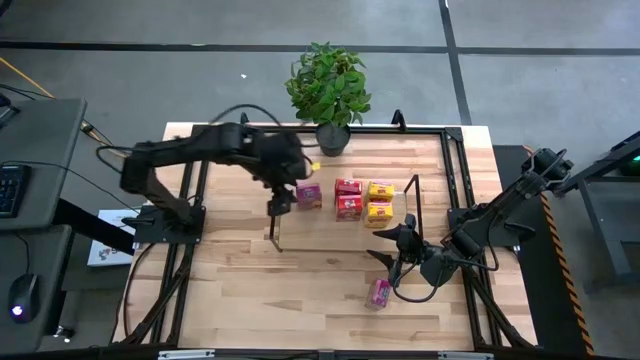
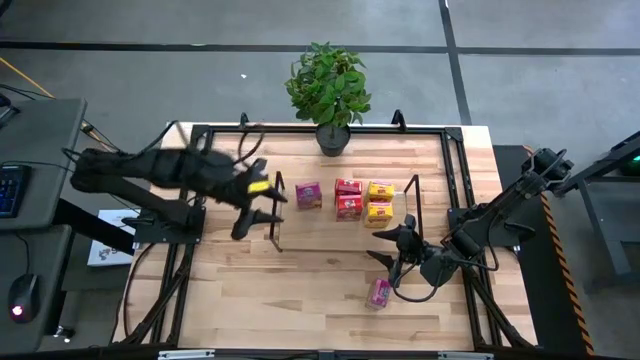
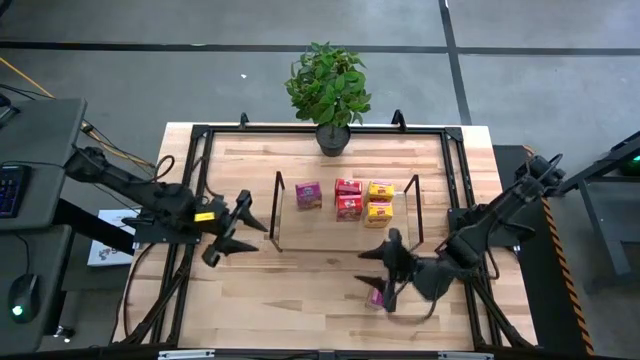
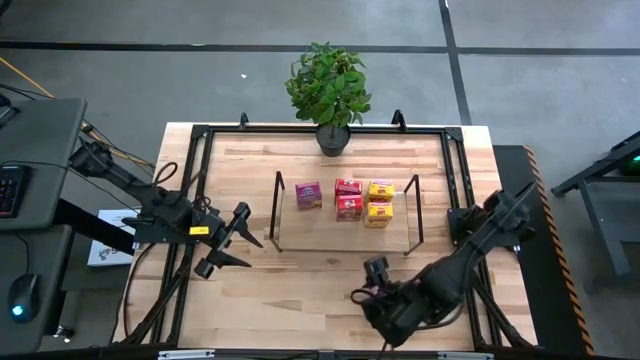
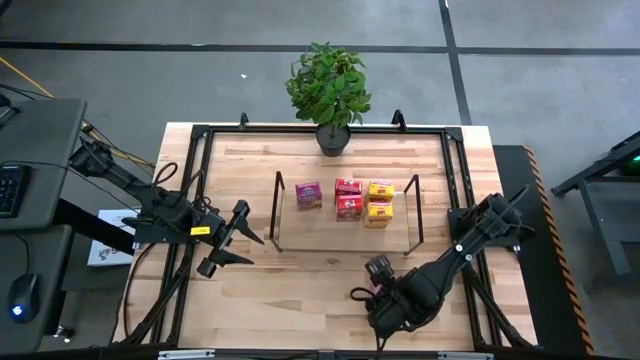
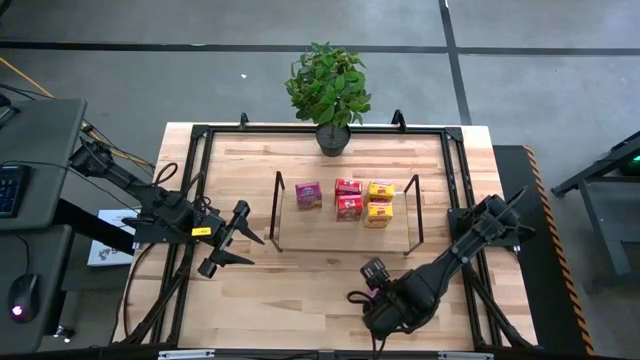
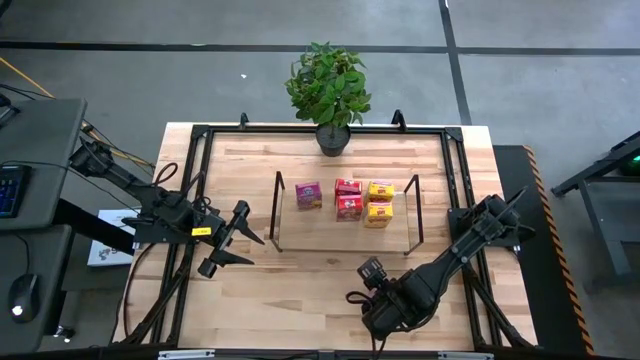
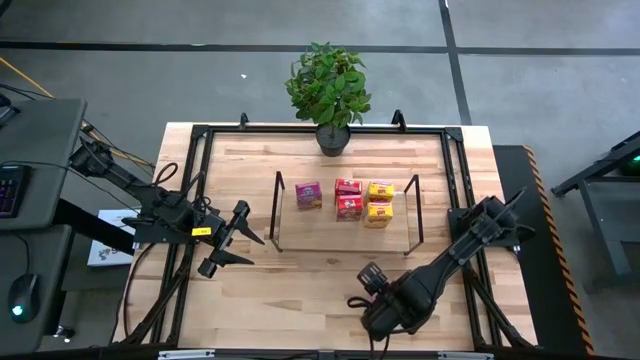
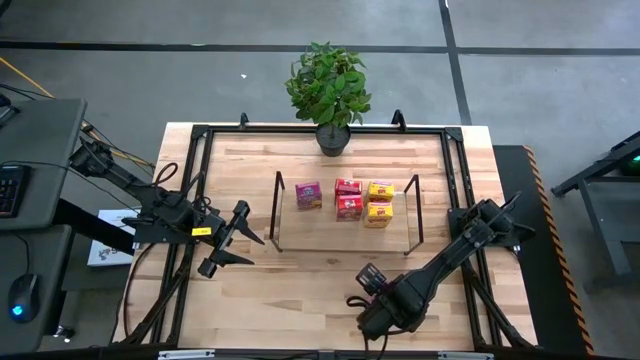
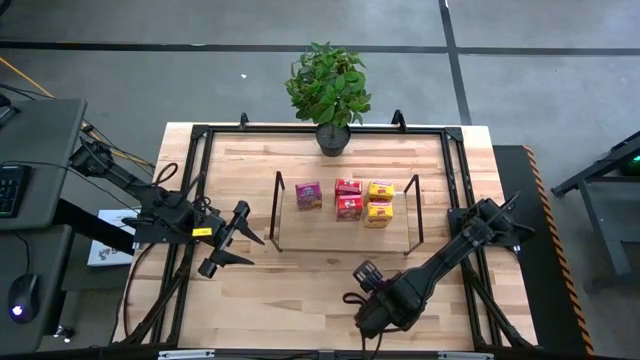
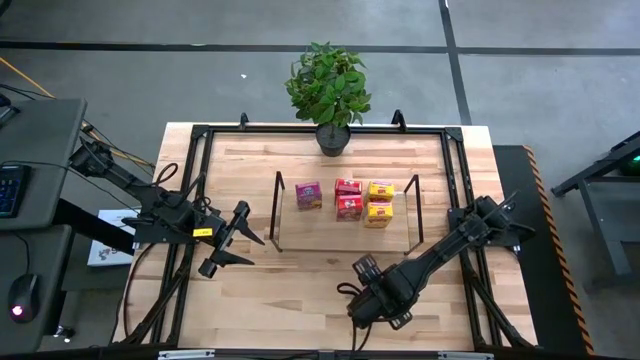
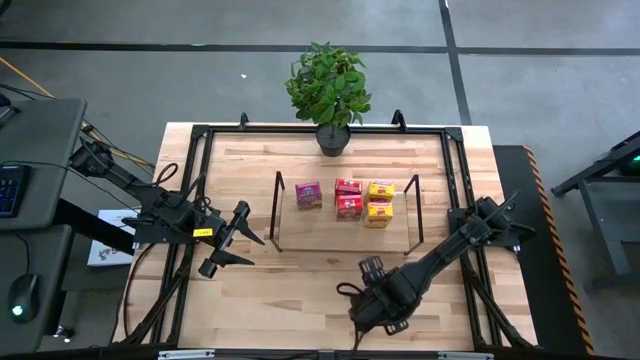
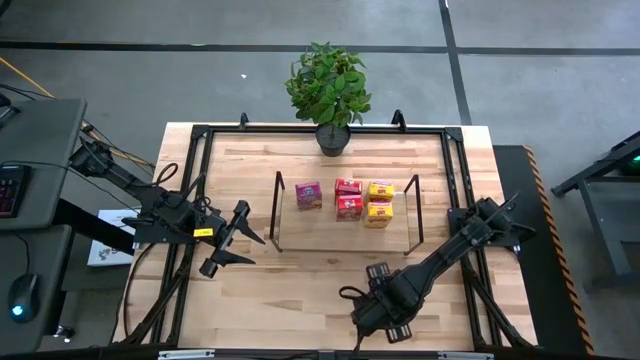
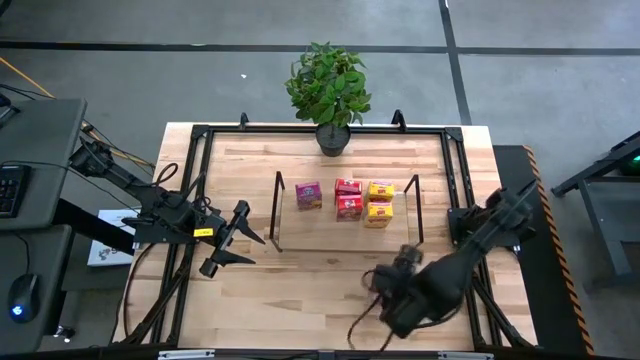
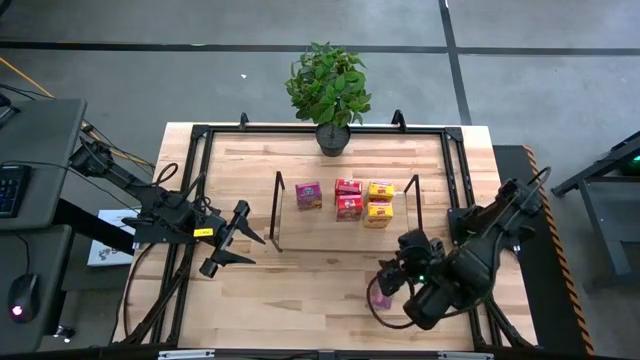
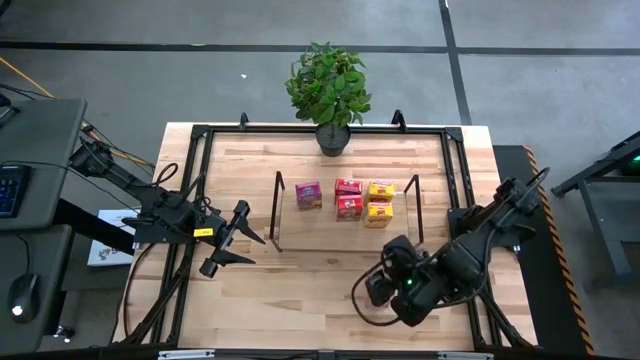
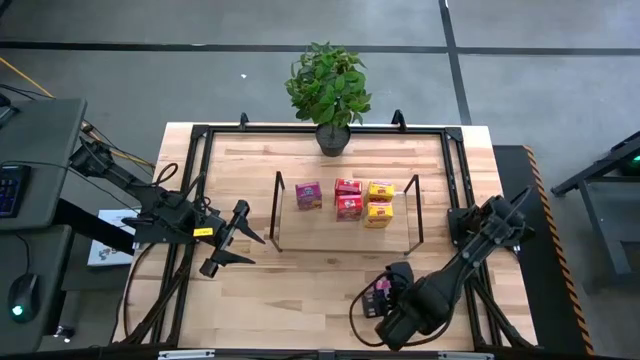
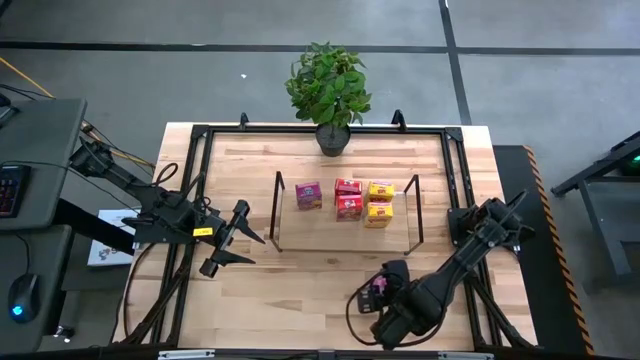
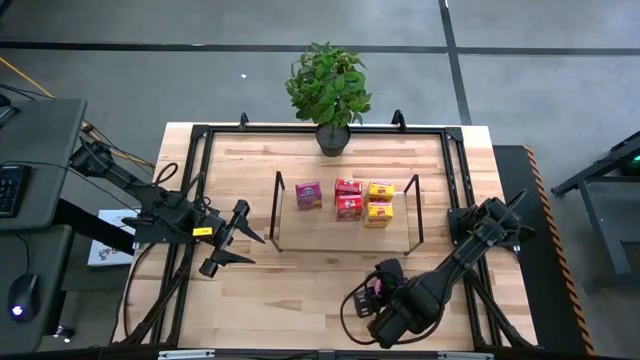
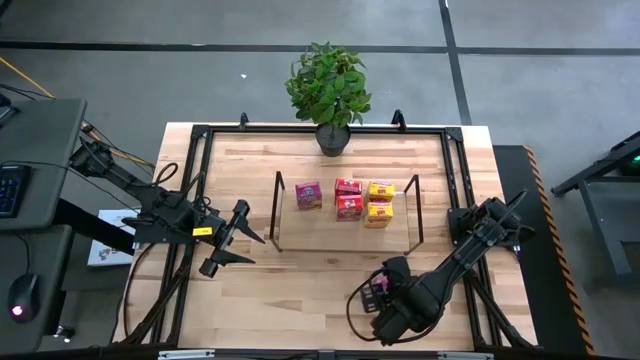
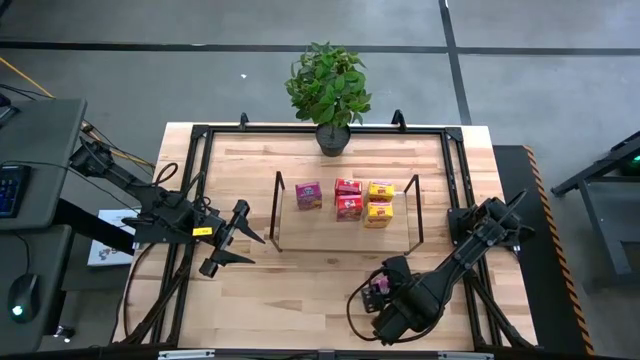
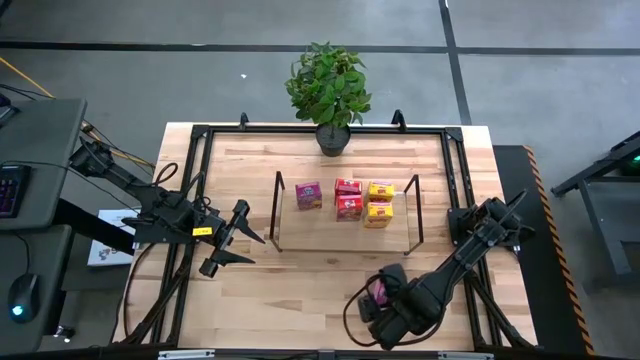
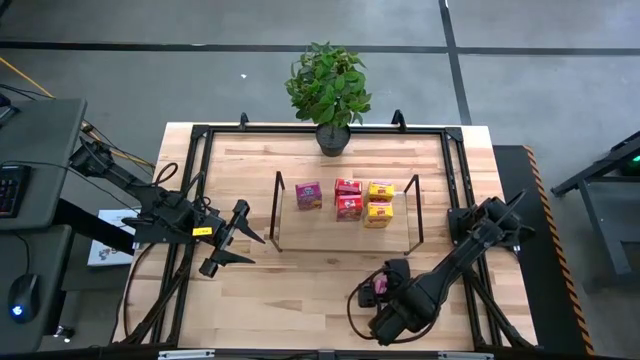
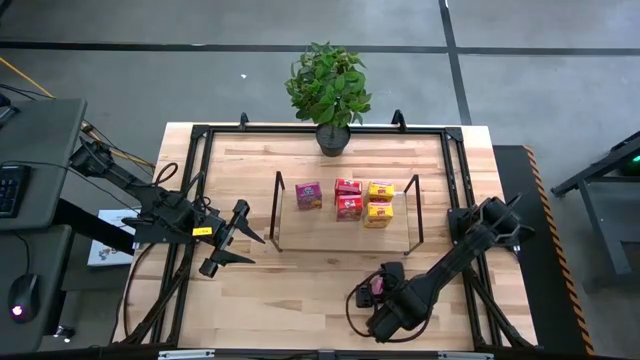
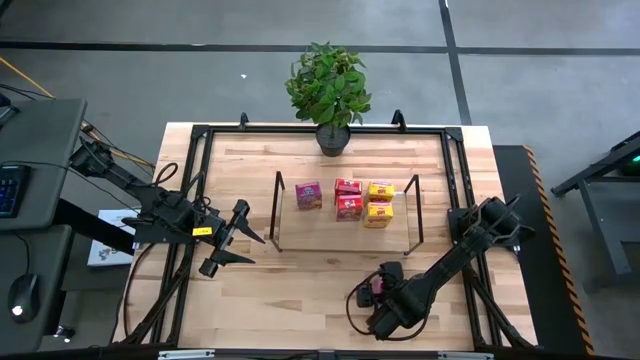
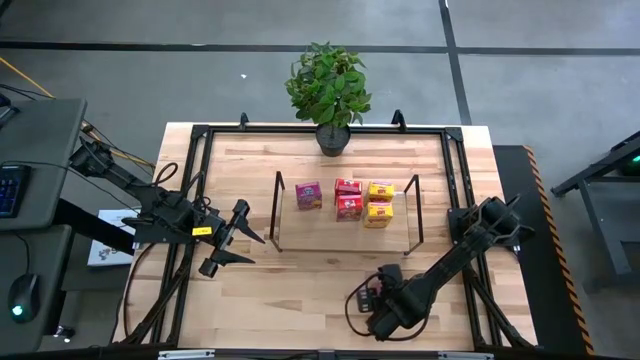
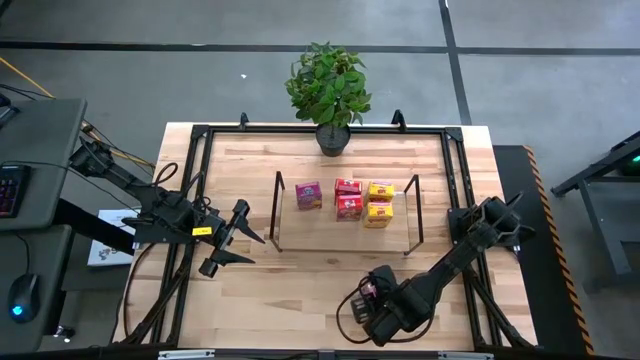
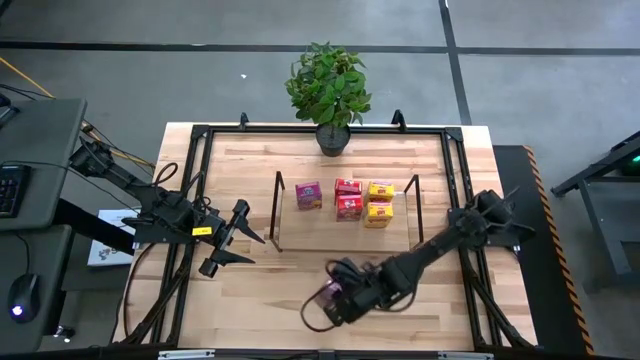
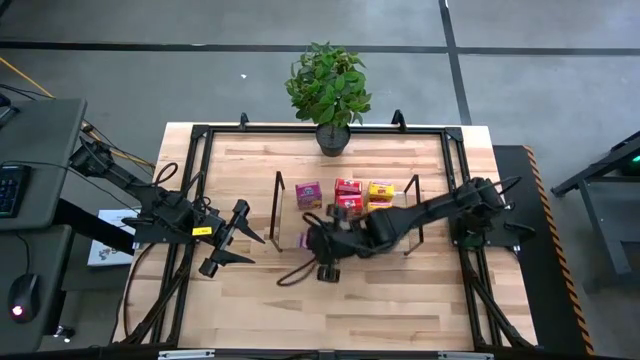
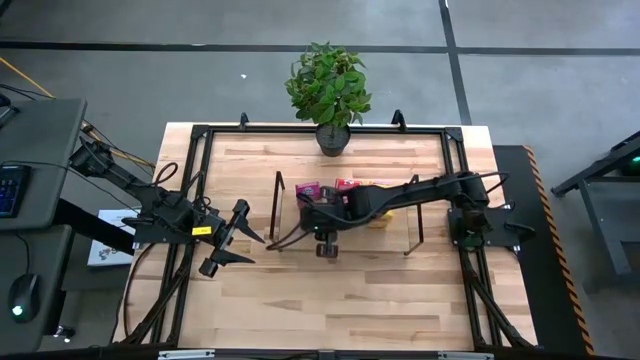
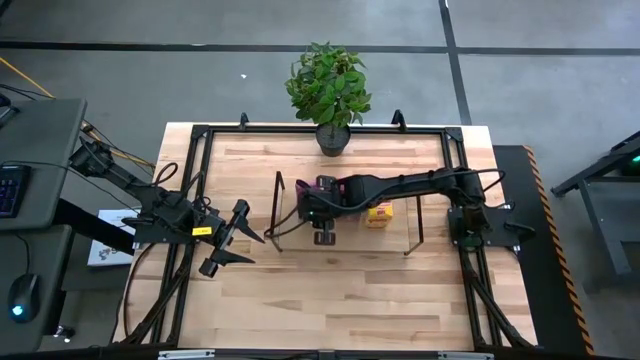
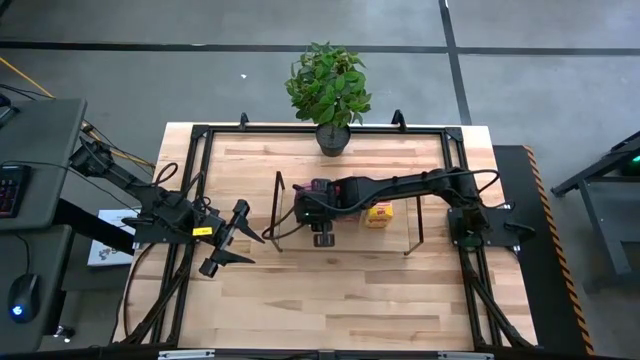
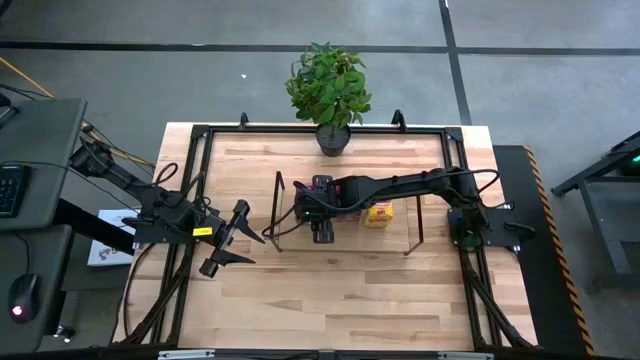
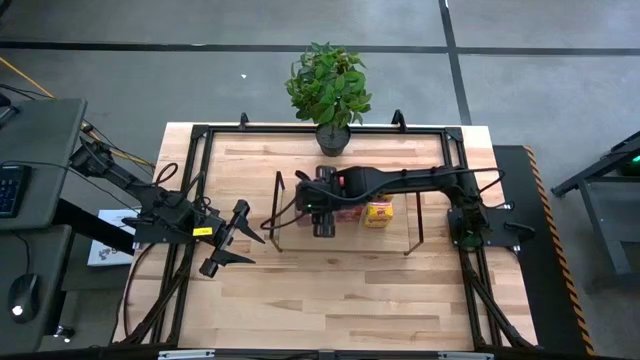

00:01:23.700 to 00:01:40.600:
Task: Stack cereal on shelf
Put the purple cereal box on the shelf aligned with the other purple cereal box

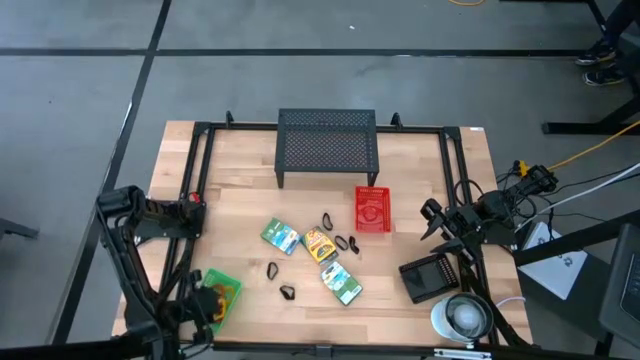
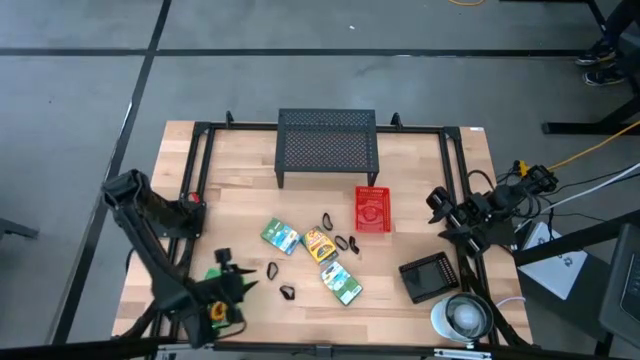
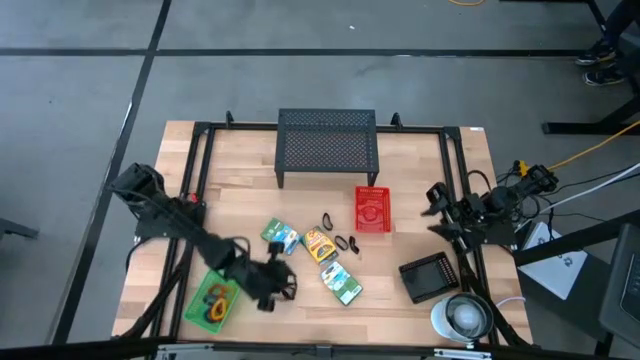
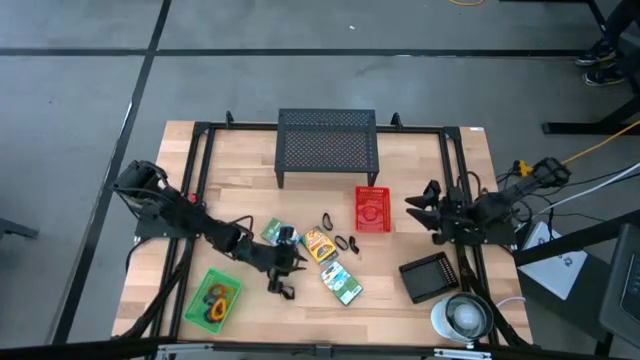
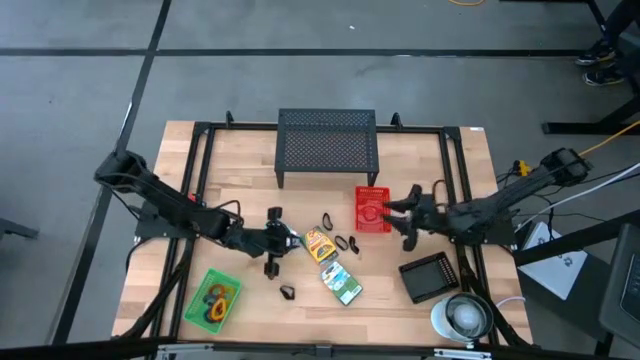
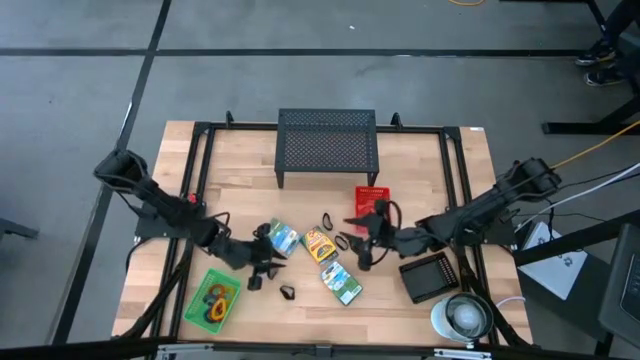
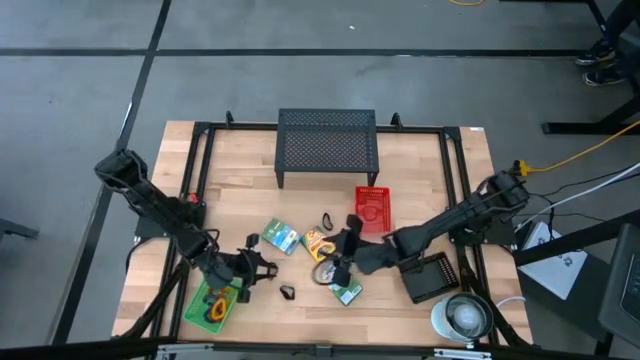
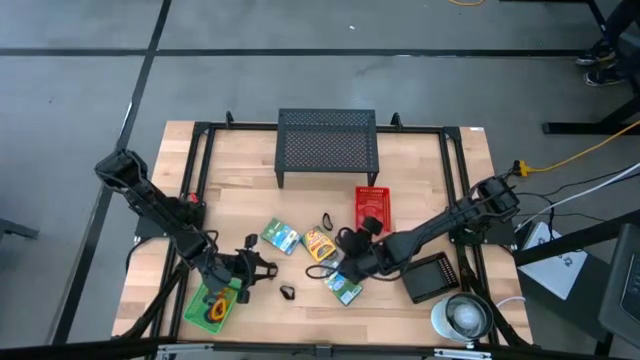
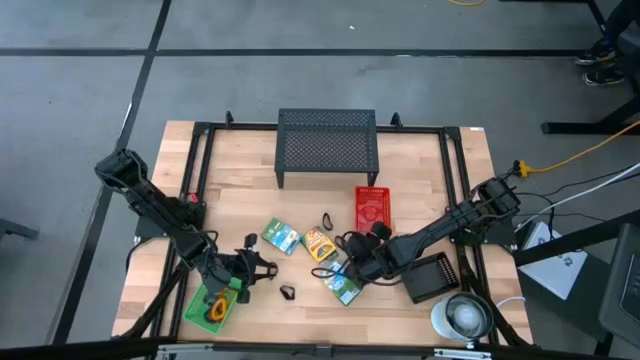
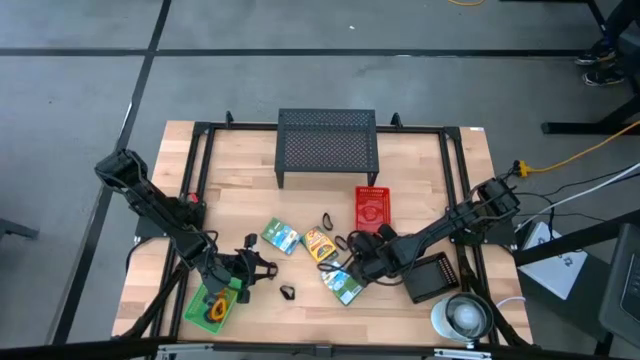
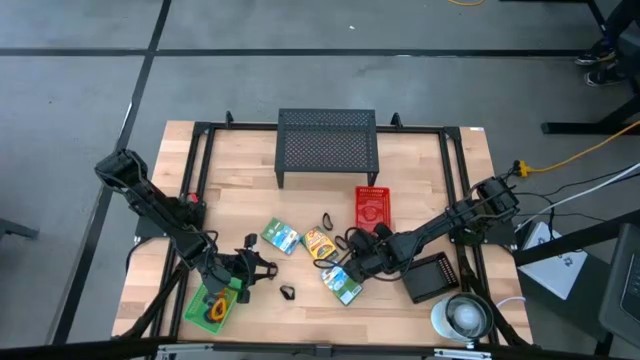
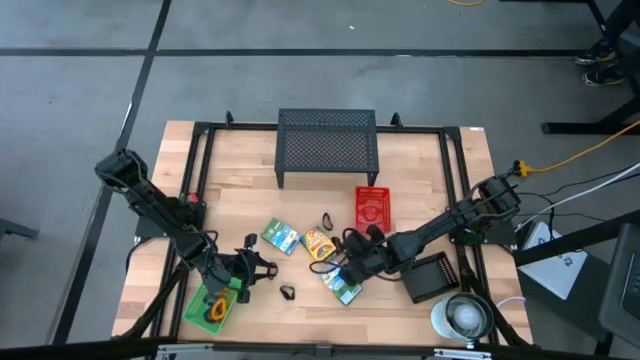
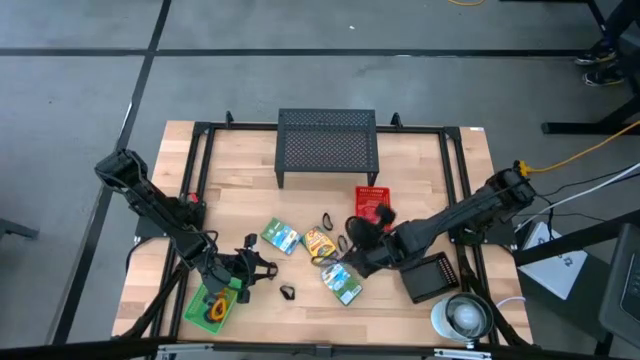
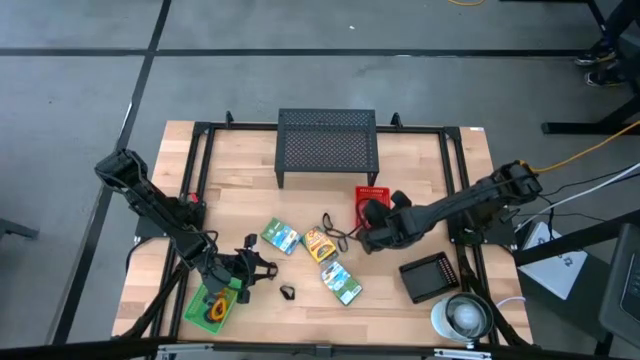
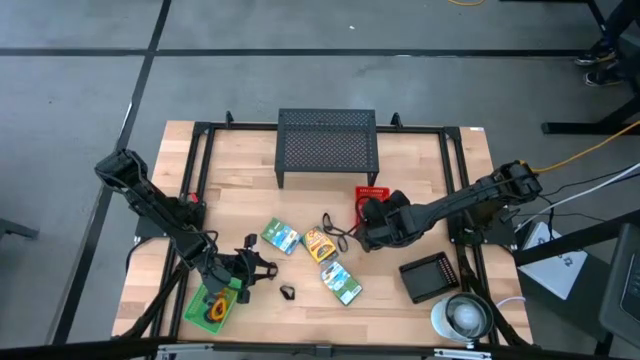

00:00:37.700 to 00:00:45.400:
Task: Pick & Place Office Desk Supplies
Put the black rubberband into the red bin
